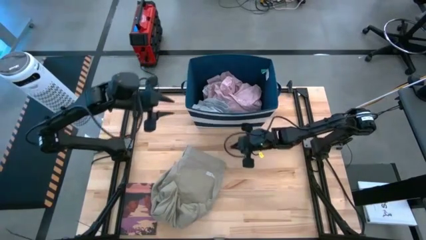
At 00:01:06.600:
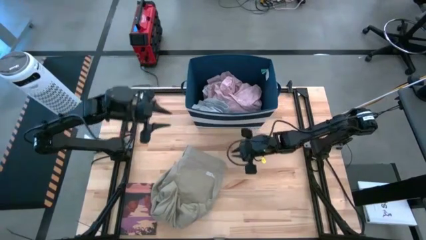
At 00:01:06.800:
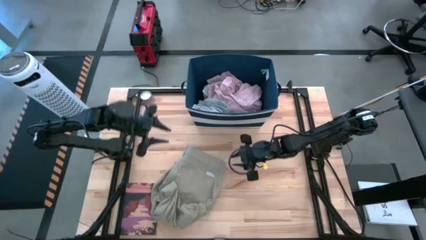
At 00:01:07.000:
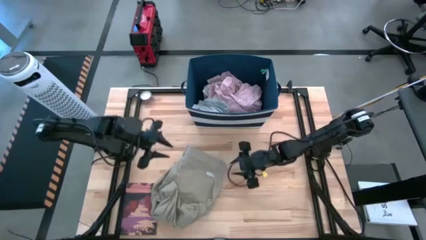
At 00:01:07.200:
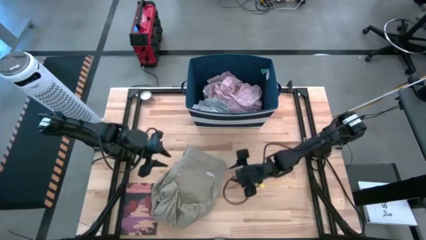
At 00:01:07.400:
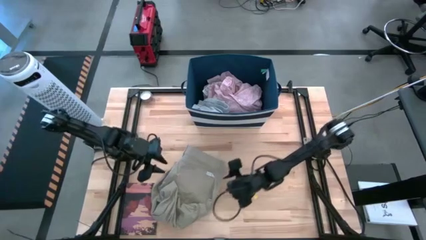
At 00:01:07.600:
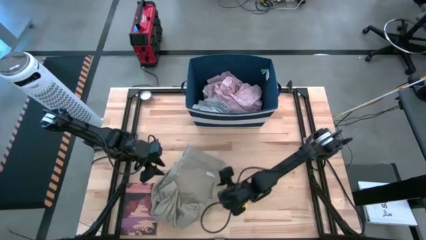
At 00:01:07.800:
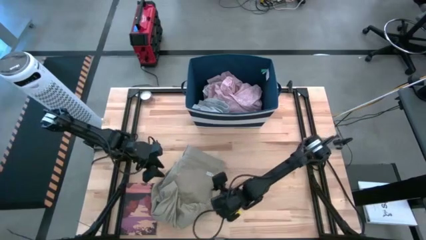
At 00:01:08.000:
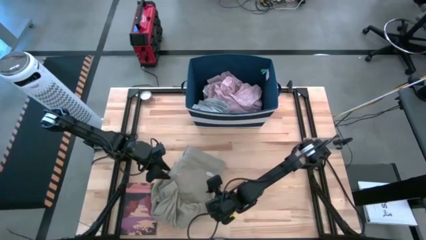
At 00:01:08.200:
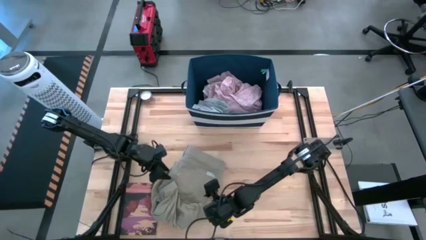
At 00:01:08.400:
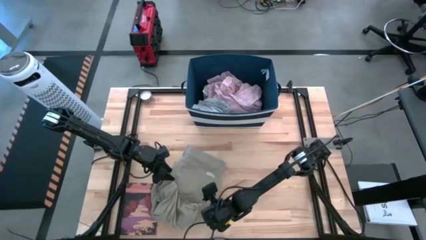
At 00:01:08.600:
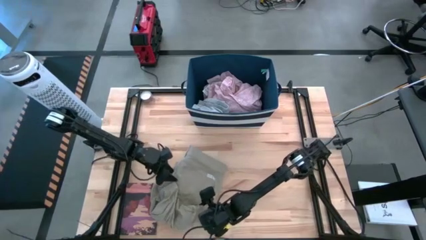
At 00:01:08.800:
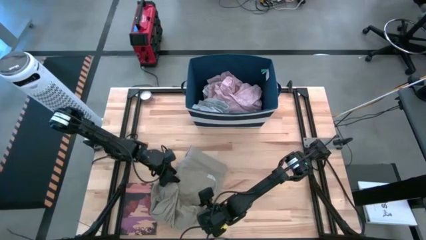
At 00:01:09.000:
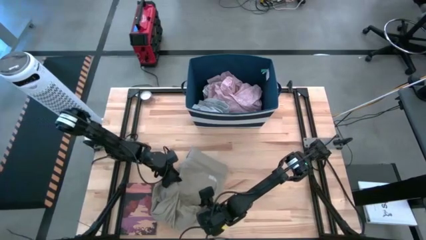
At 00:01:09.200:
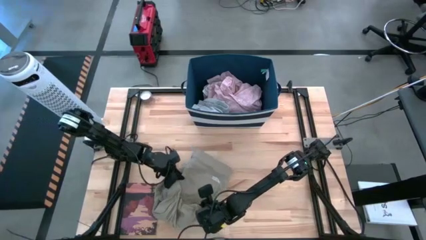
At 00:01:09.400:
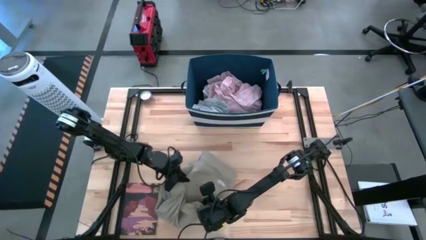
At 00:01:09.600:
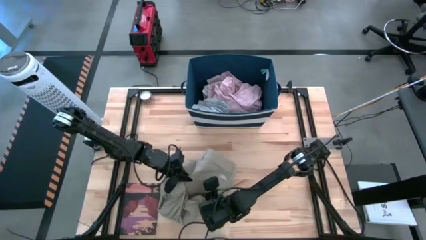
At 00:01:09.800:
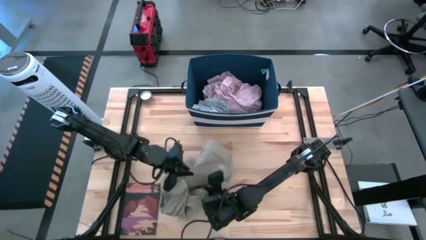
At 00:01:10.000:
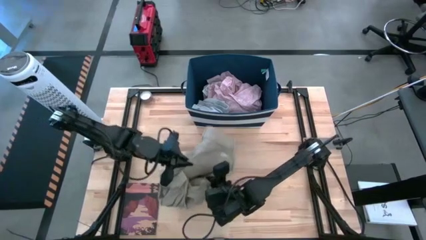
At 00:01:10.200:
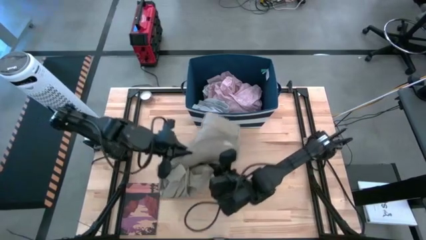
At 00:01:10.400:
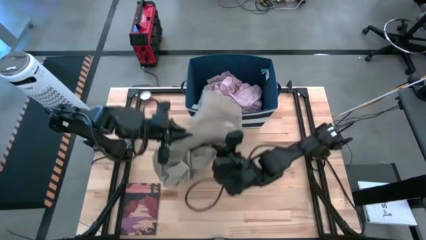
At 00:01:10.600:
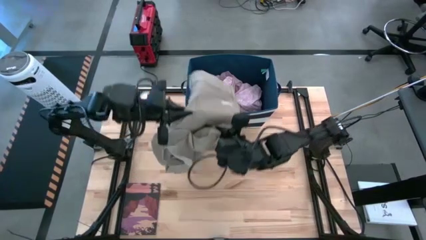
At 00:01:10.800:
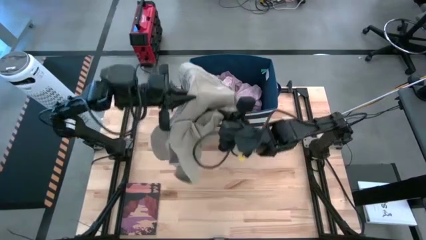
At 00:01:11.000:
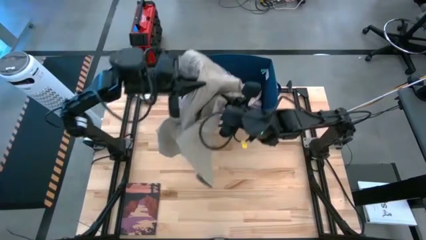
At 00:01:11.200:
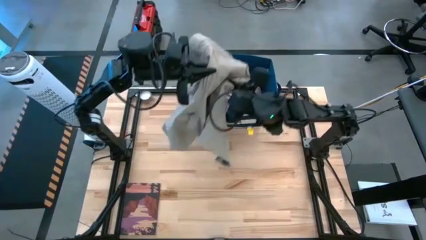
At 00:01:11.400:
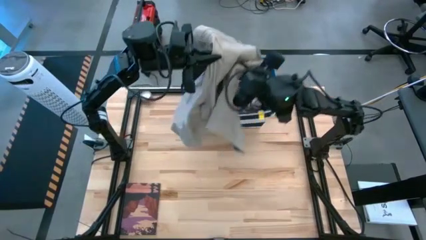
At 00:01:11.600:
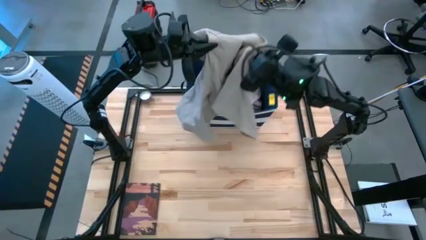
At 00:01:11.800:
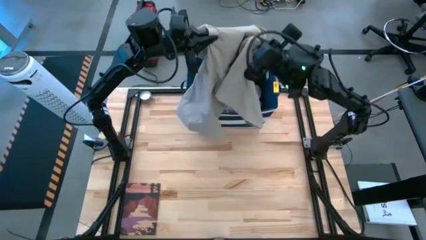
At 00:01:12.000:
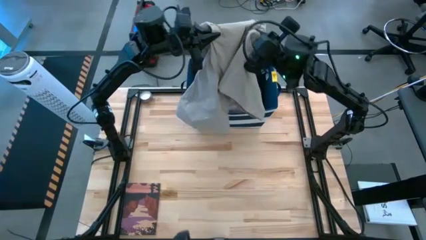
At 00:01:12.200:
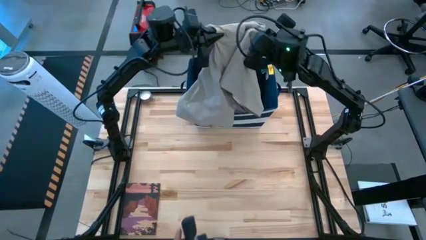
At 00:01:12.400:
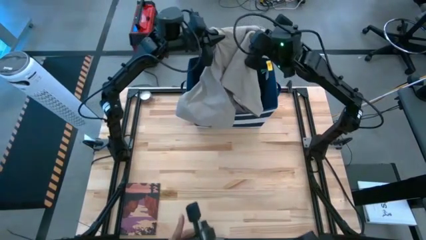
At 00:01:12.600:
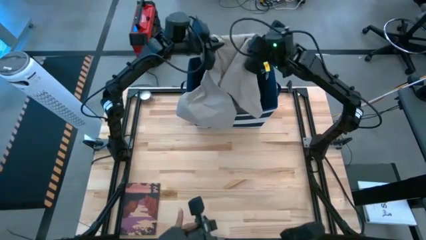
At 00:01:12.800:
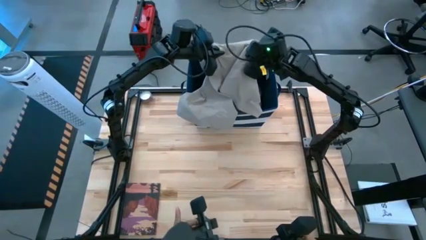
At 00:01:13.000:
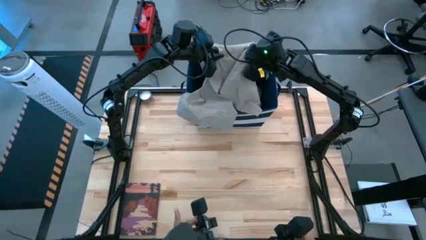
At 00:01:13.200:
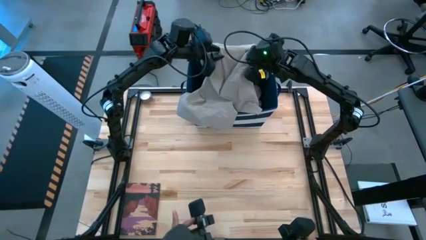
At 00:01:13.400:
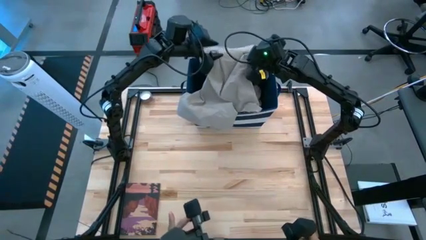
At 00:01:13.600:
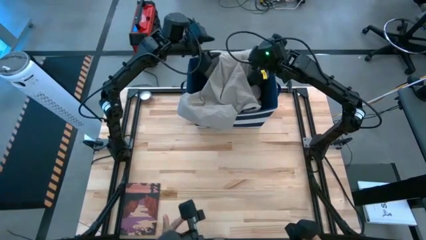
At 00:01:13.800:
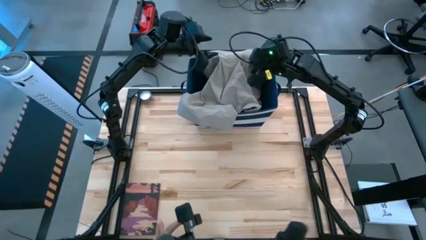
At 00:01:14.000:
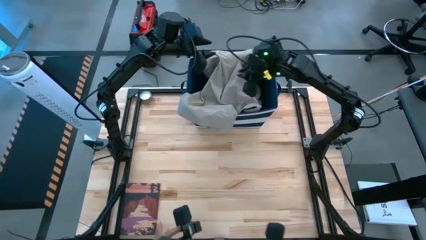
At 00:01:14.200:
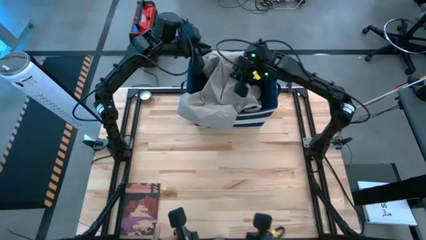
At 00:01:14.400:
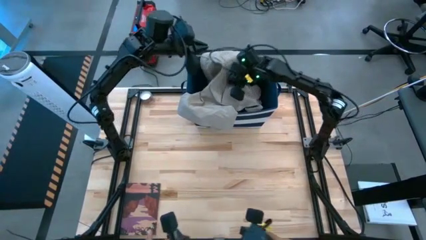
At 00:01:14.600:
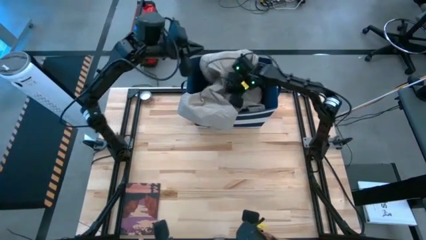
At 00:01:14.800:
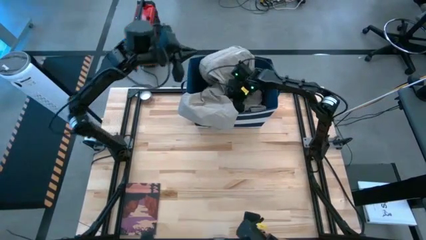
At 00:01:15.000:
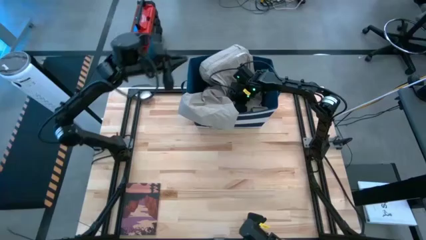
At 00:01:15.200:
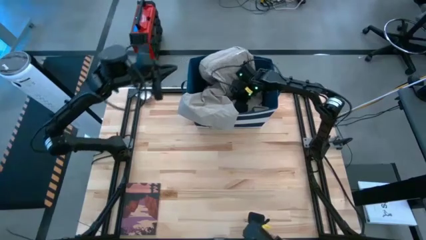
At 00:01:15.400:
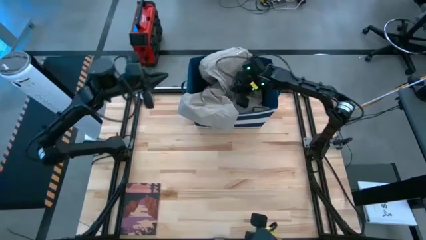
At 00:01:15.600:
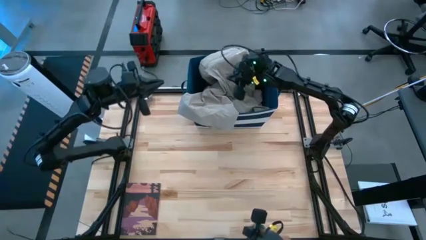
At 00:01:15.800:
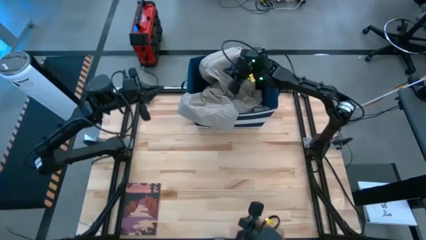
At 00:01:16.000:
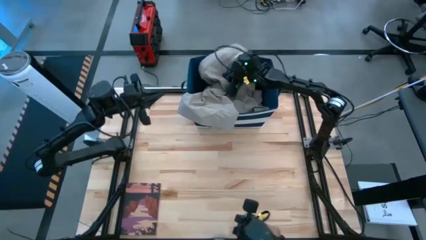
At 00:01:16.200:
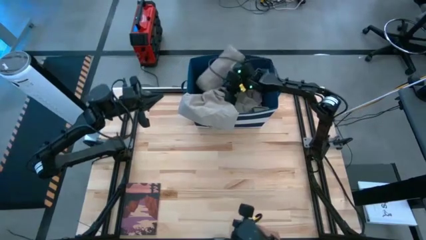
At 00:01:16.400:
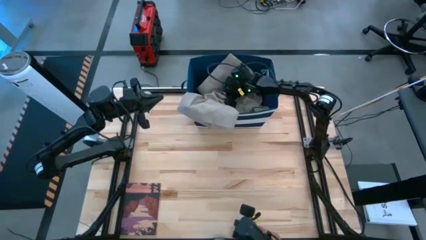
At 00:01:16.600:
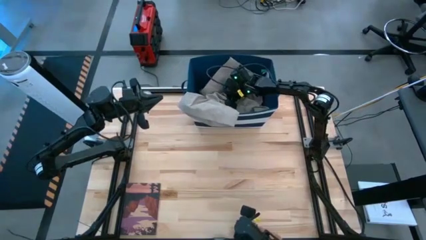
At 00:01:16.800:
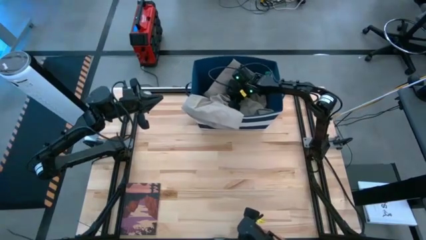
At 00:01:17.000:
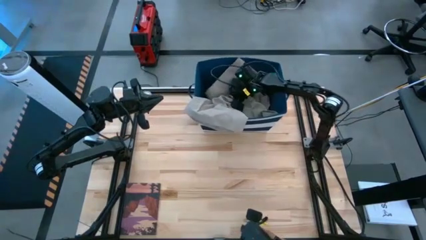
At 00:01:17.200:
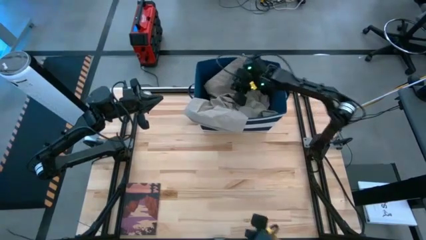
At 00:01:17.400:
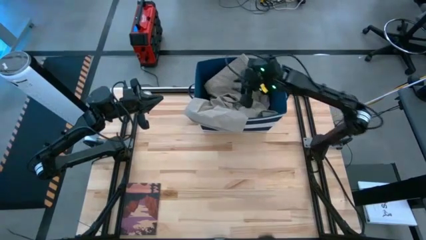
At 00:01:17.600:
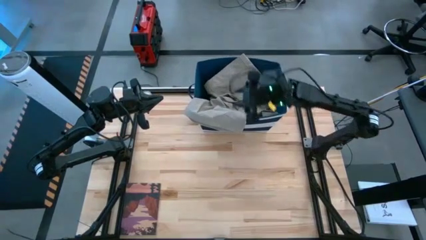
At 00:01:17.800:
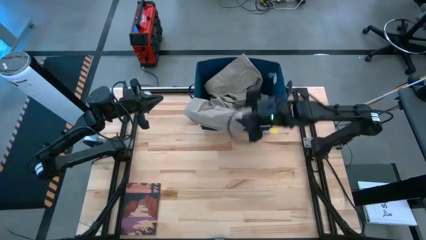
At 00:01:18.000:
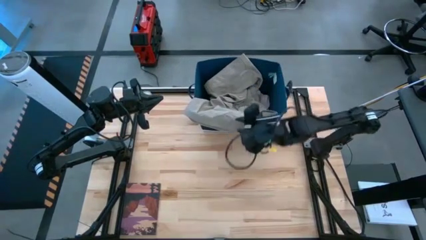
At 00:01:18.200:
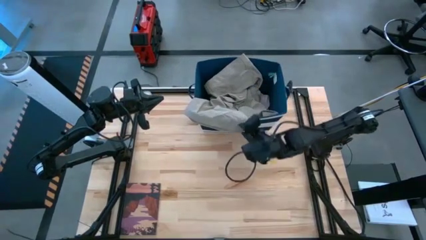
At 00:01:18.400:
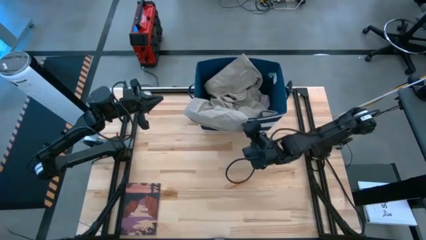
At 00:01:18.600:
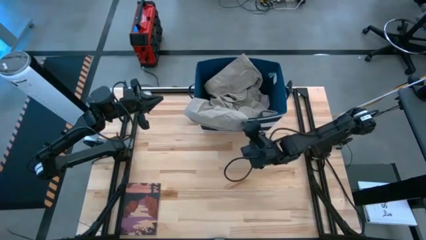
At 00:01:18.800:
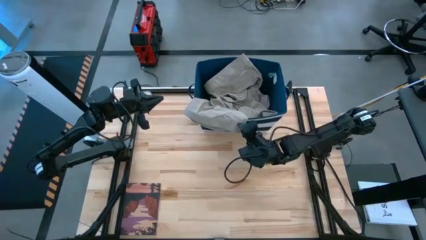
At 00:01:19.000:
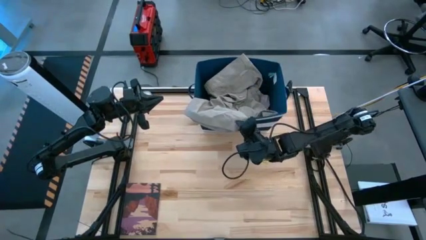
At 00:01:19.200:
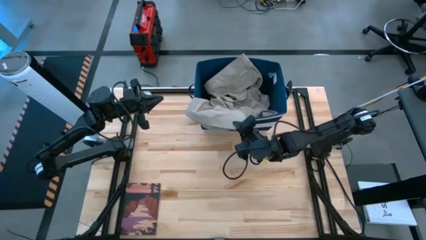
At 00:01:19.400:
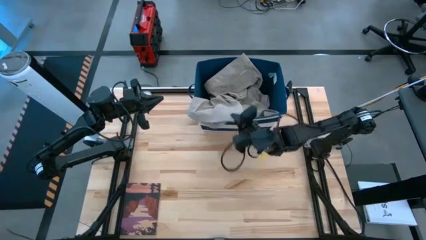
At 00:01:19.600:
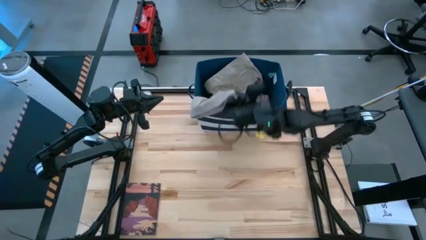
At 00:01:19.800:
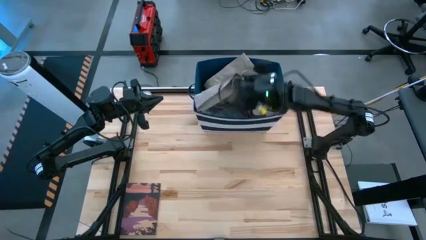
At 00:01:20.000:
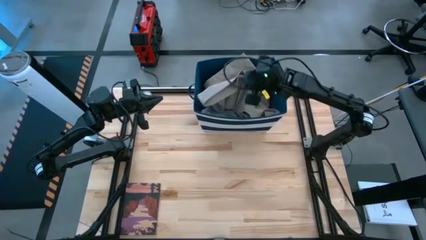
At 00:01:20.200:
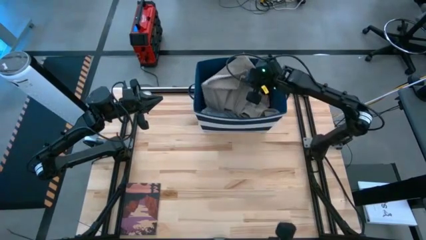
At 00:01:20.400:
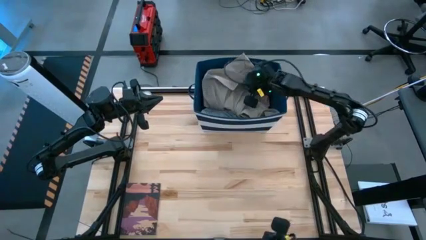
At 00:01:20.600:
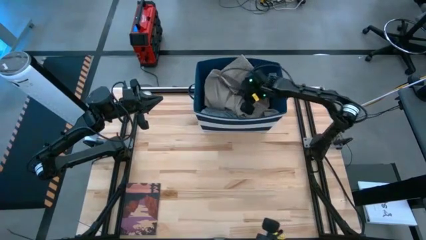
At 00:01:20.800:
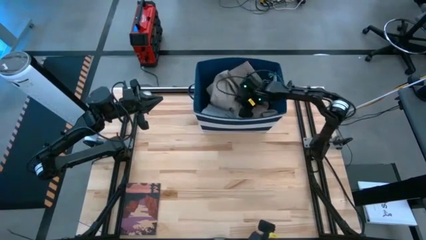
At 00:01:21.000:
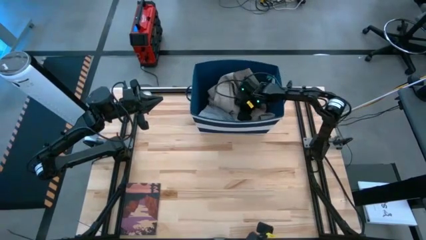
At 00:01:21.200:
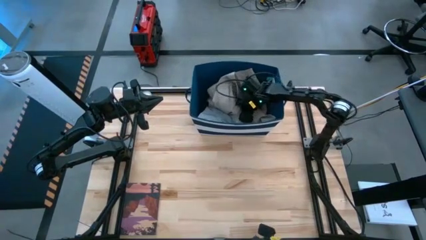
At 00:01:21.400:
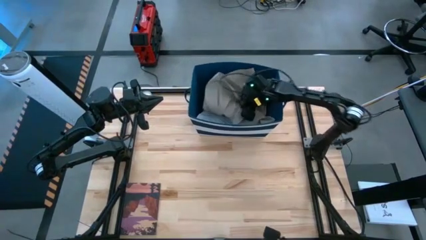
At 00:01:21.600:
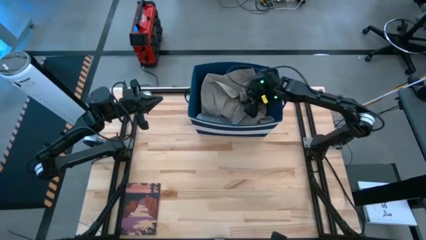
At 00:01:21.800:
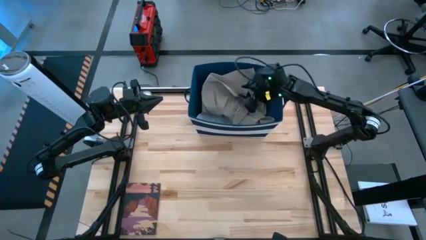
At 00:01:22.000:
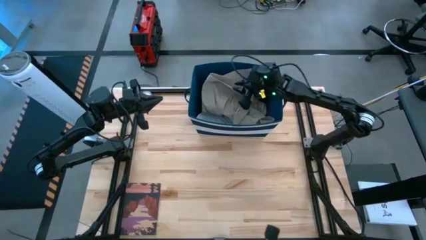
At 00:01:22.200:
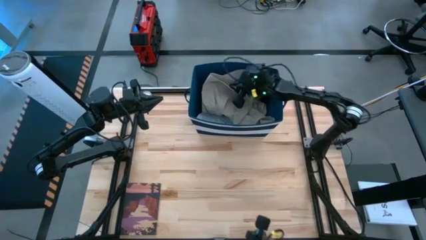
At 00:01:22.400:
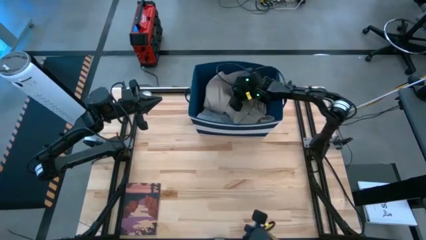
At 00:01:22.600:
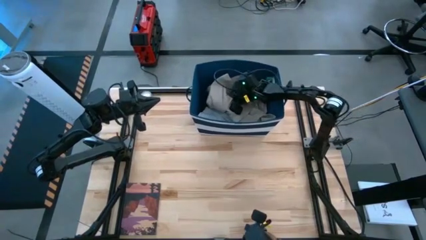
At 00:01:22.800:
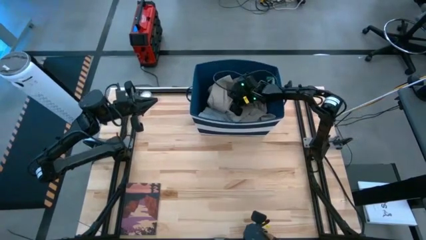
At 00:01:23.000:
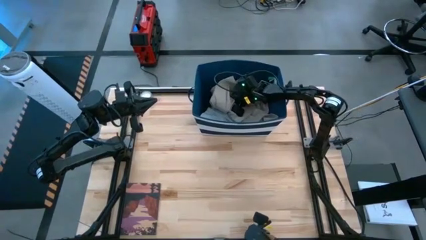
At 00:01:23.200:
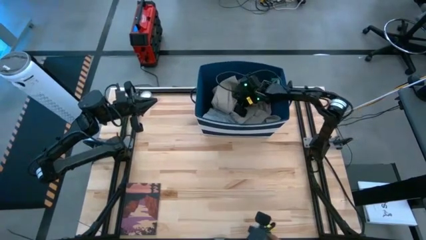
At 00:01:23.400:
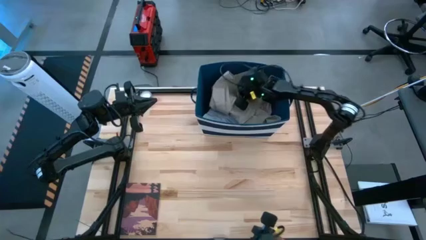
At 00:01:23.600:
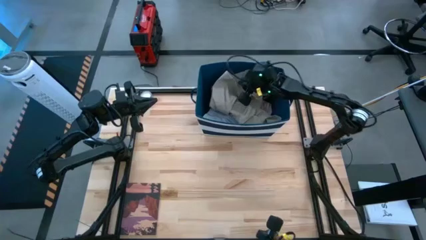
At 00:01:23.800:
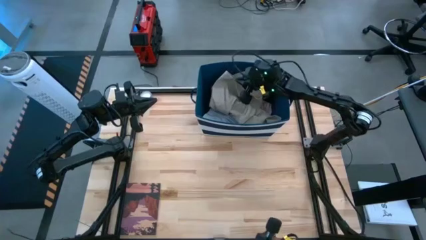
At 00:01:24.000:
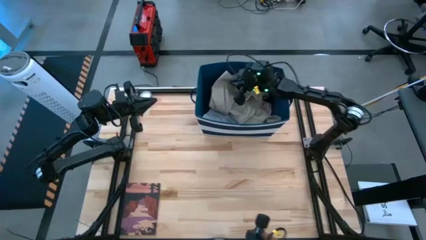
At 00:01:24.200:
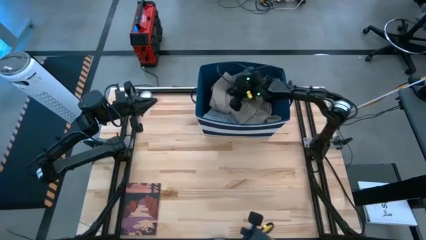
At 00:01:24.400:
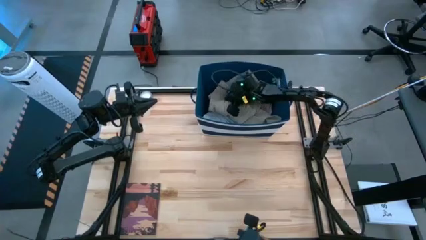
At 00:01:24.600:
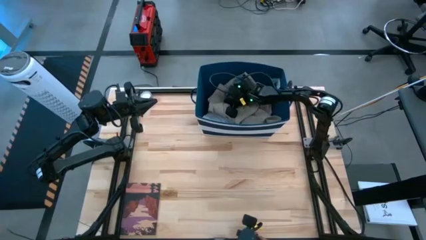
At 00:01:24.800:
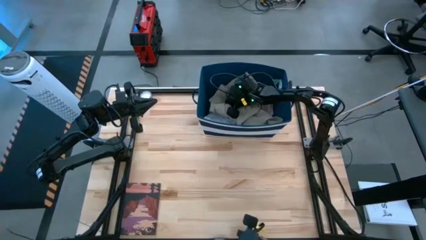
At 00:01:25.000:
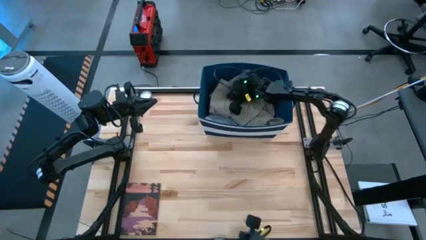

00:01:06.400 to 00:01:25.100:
Task: Sort clothes
Put the gray long pants into the laundry bin
